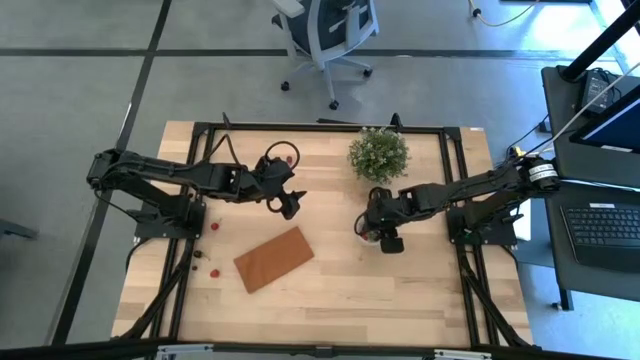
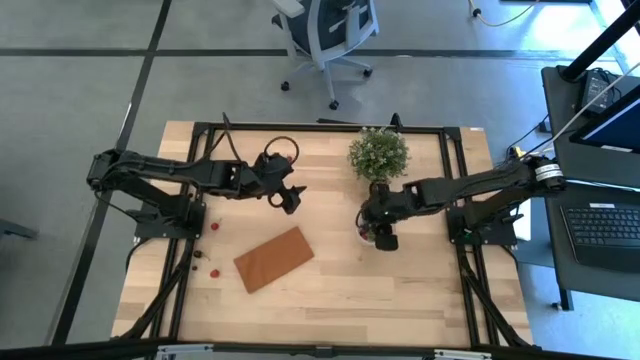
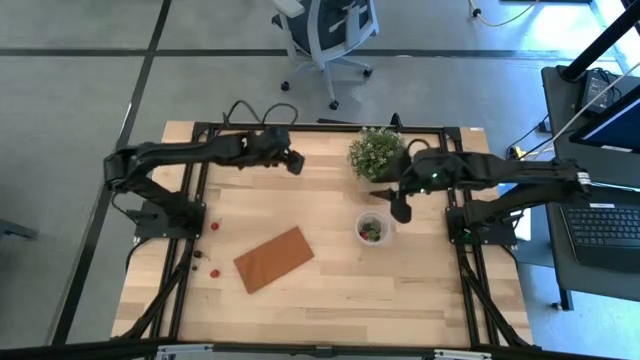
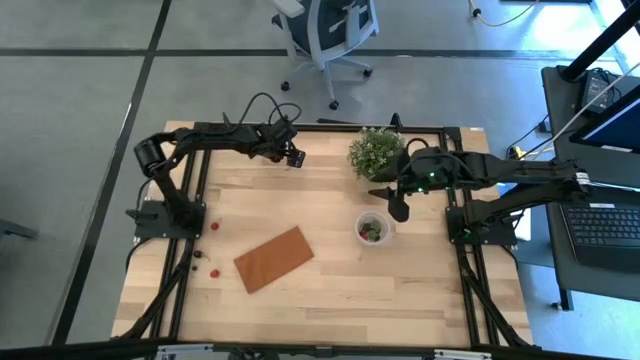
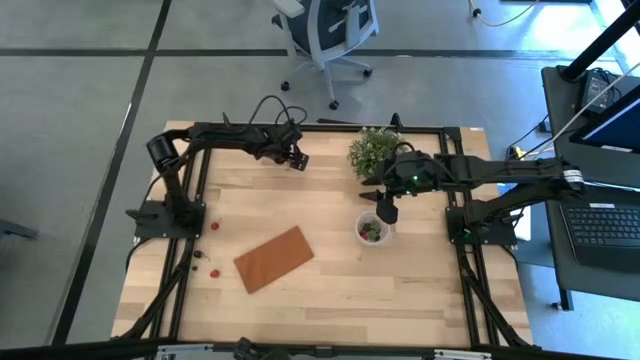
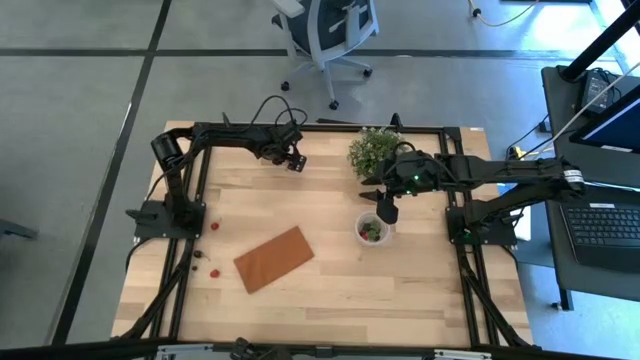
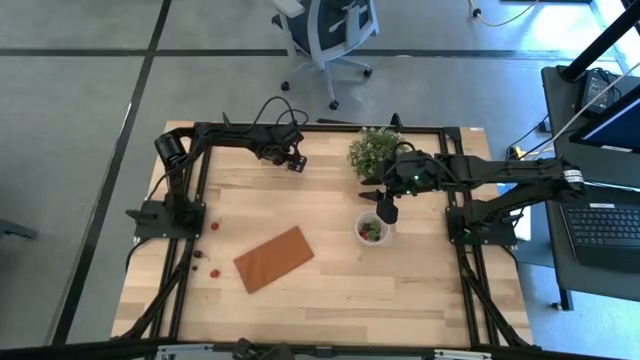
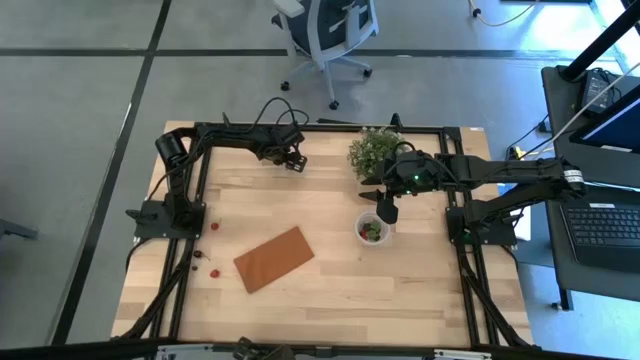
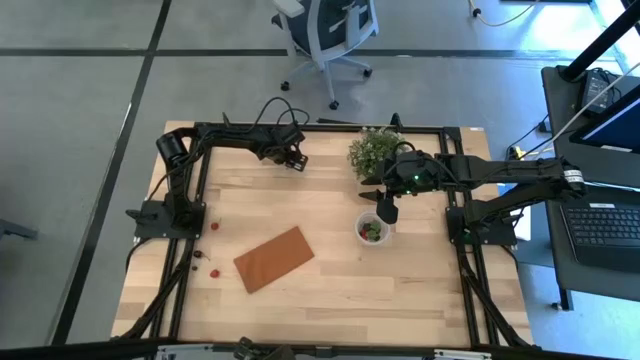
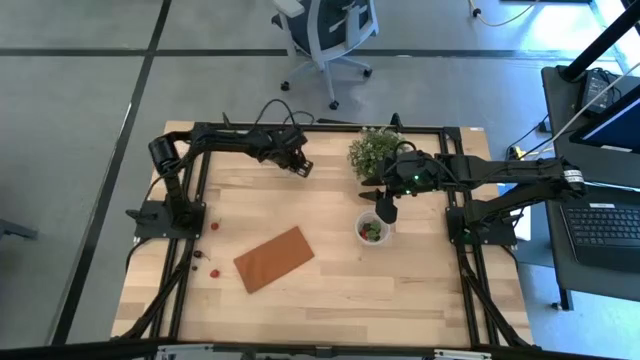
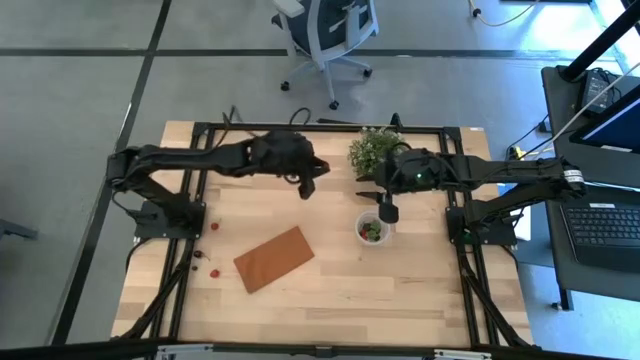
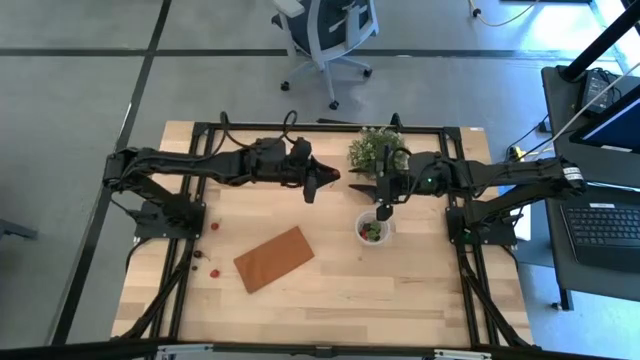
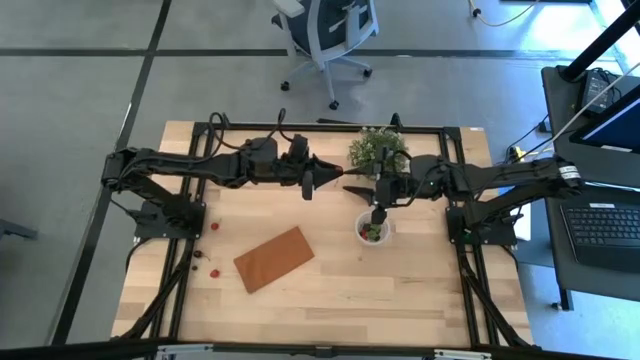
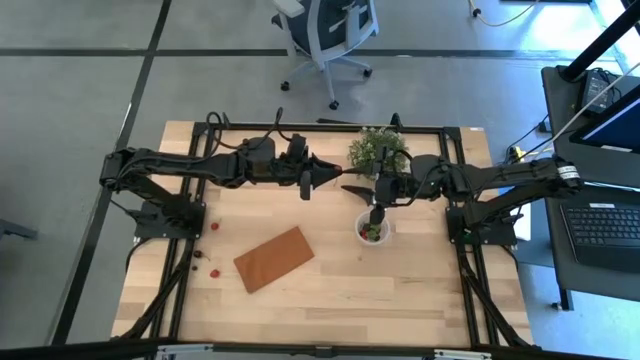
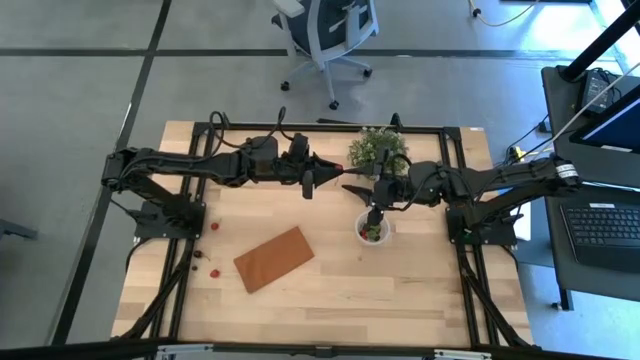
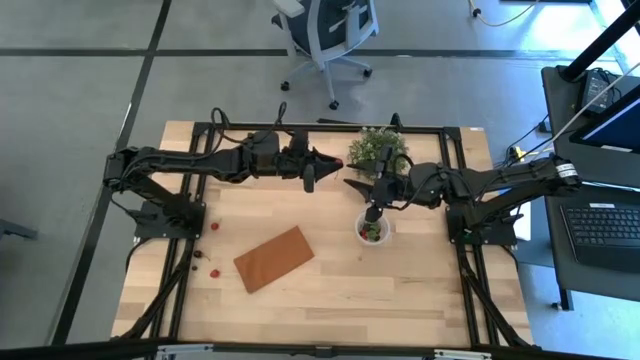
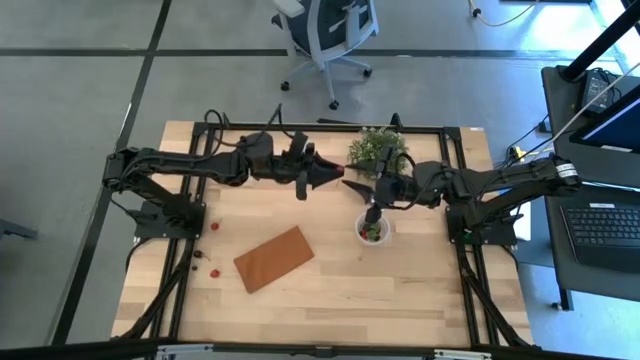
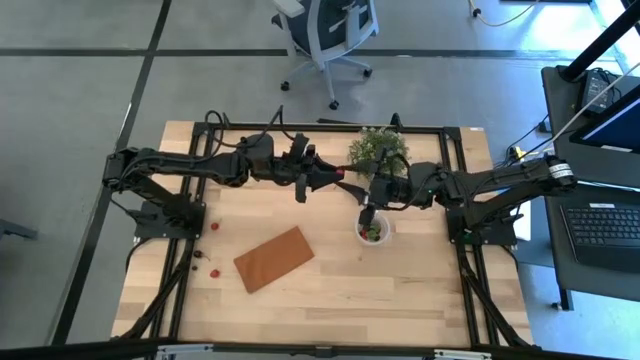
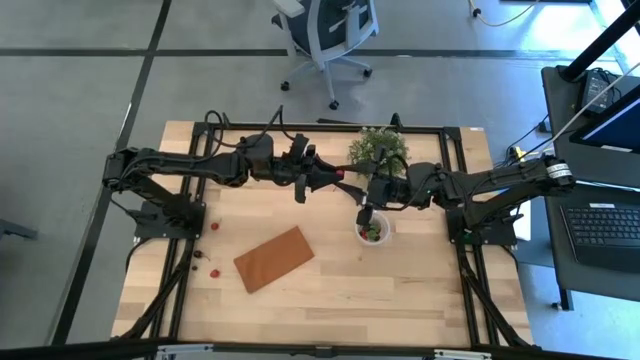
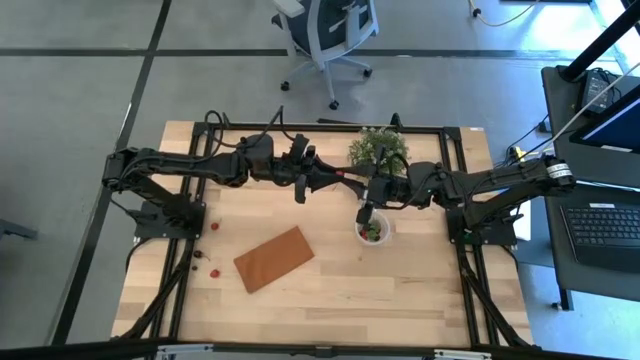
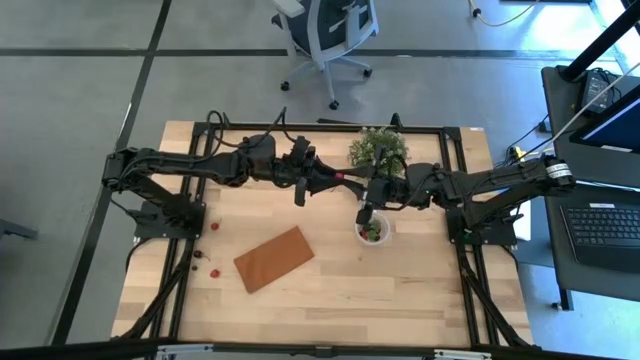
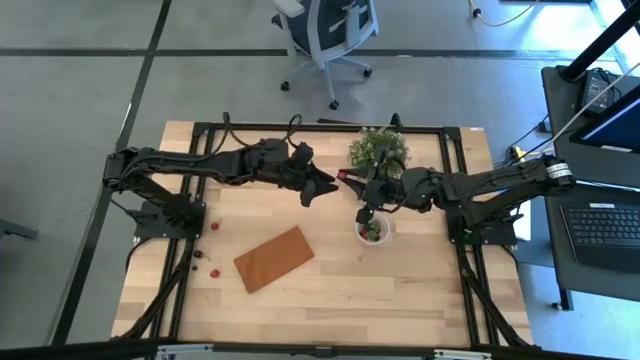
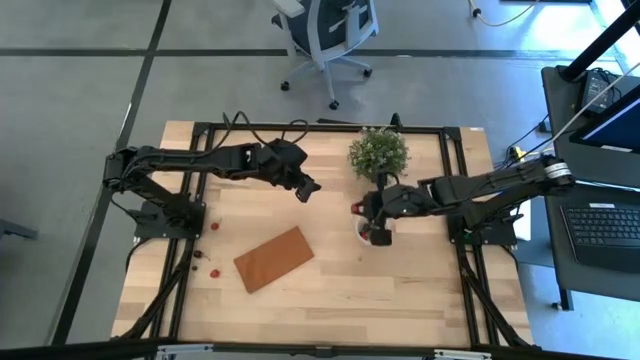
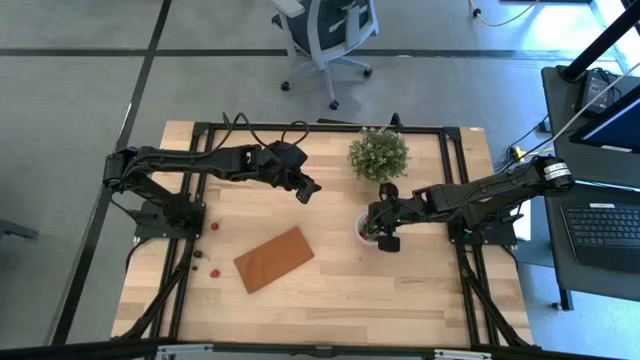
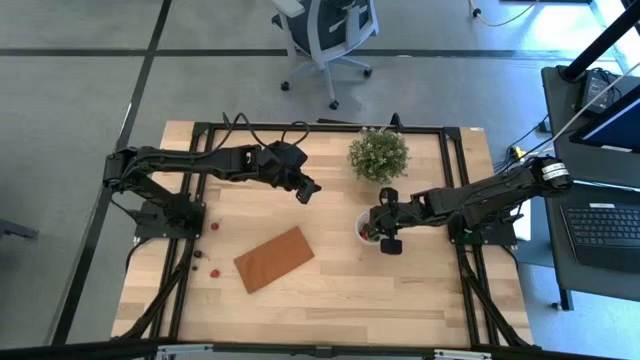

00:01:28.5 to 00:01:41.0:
Task: Pick and placing Produce into tupperware
Put the red cherry into the transparent bin

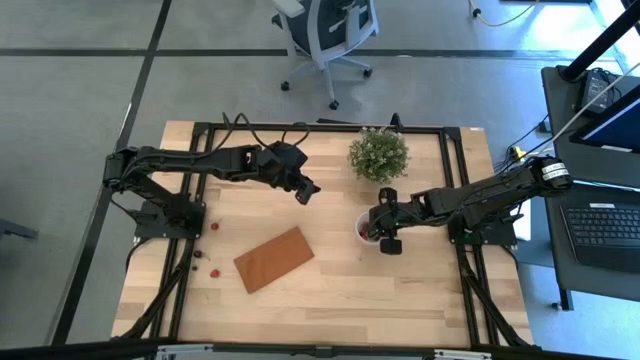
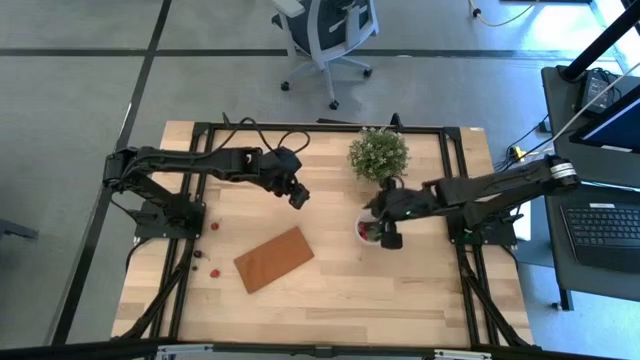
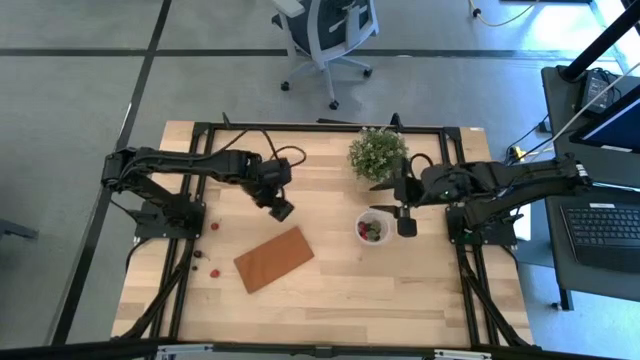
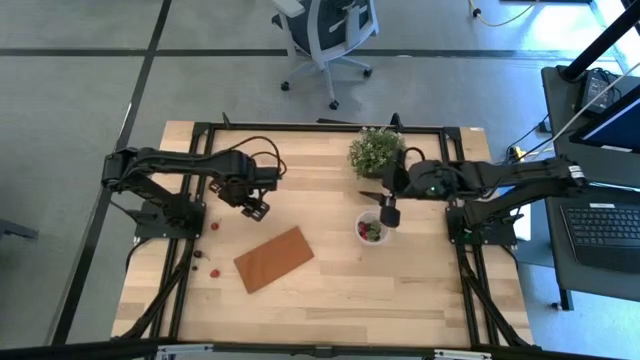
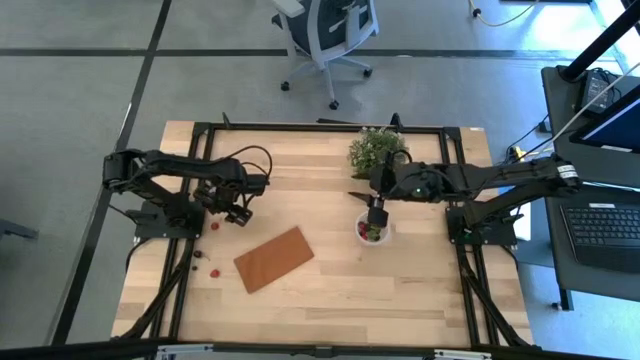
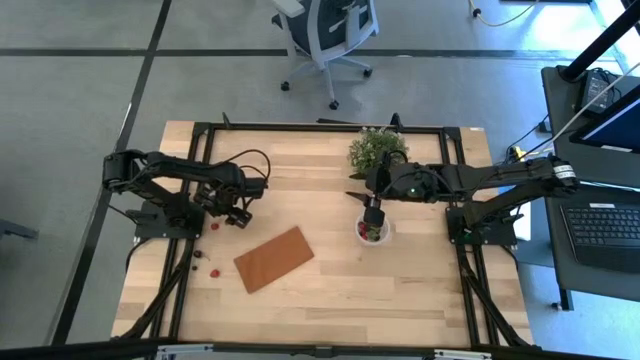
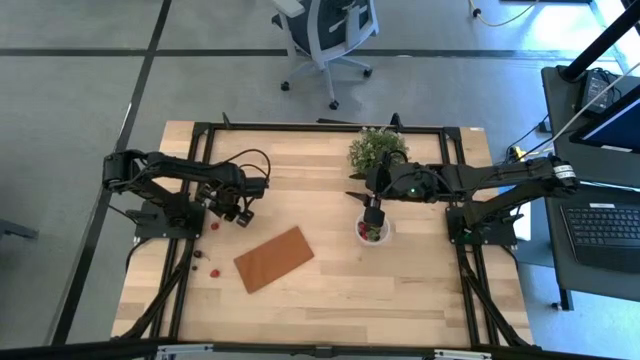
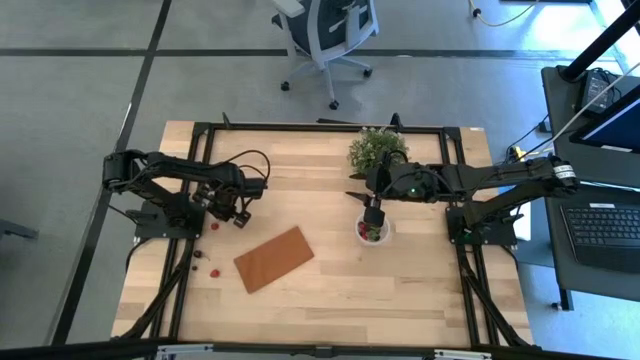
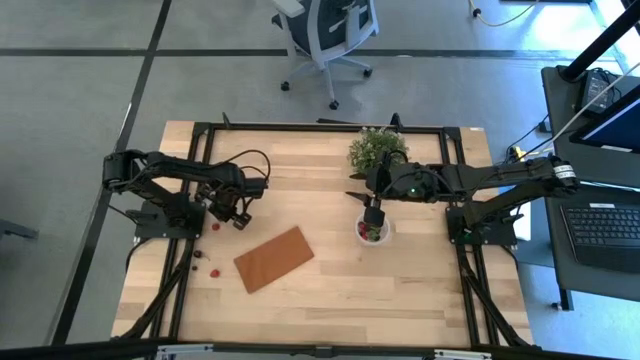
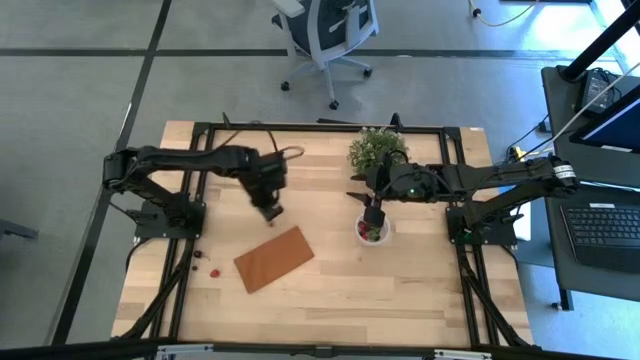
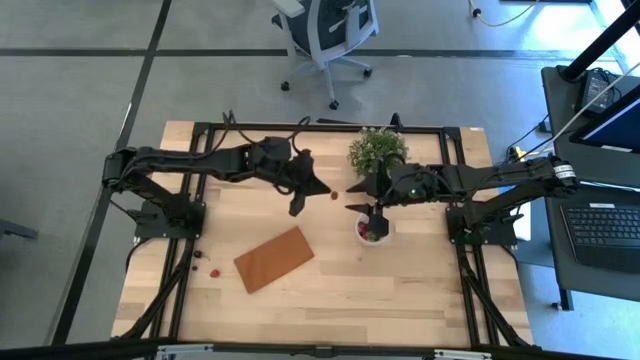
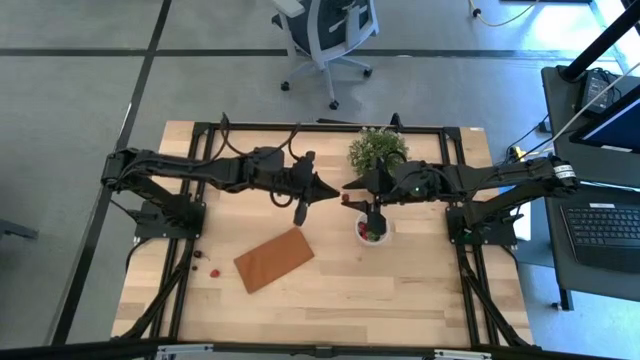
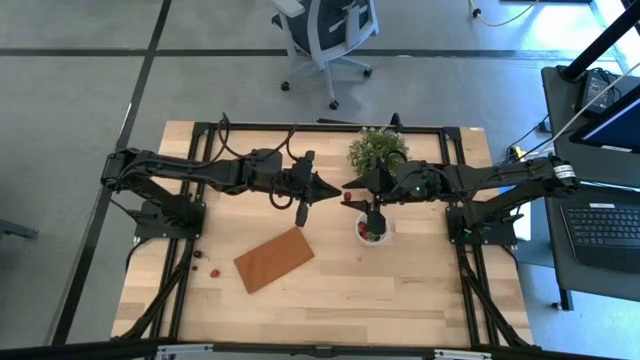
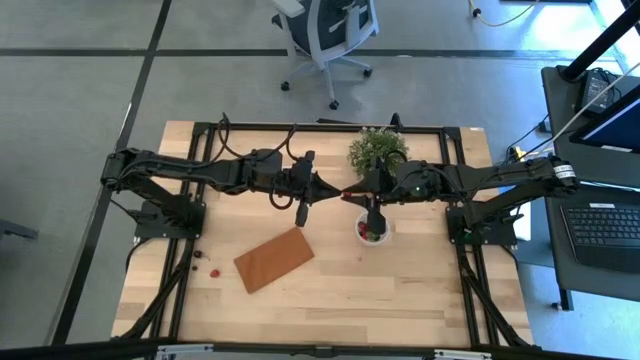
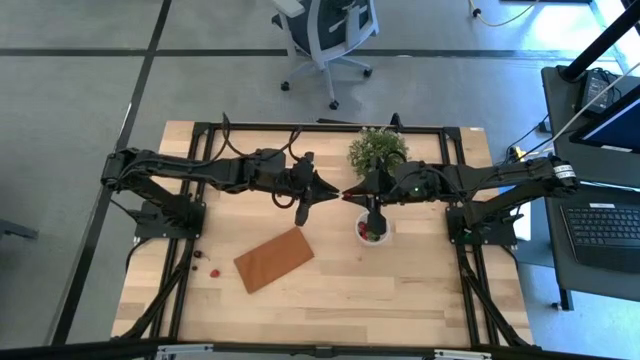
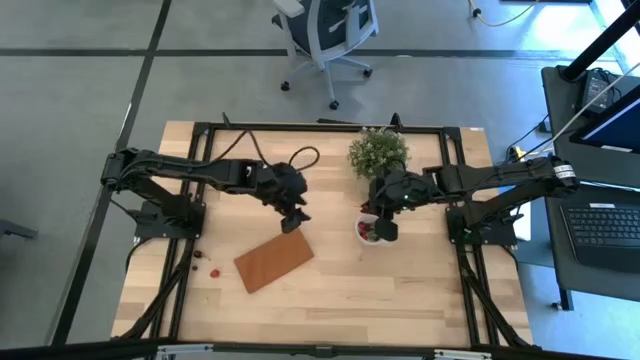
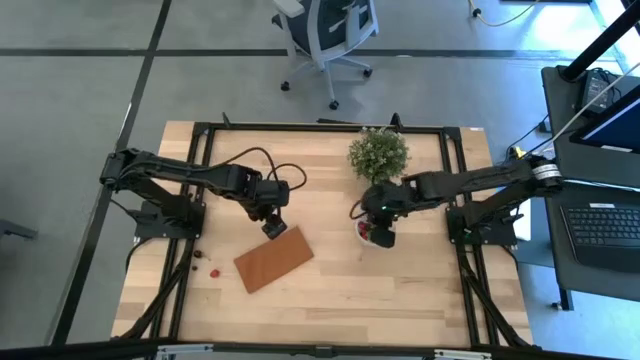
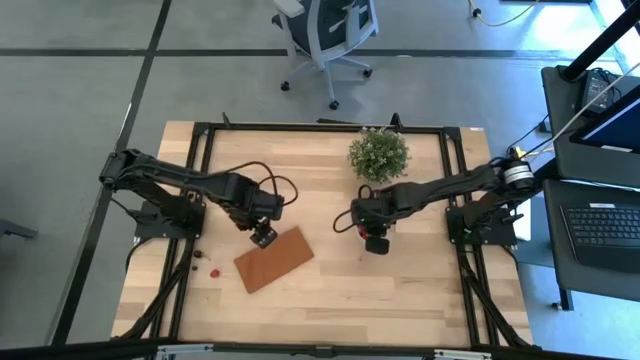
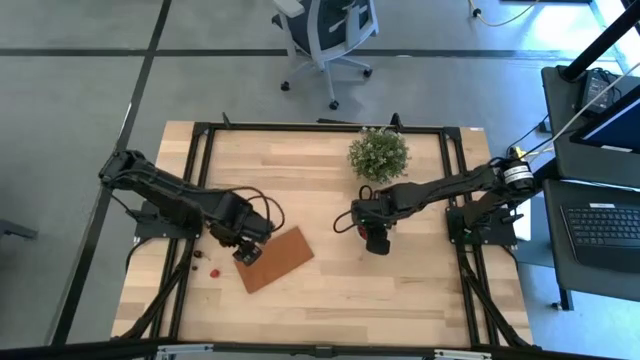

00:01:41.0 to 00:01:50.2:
Put the red cherry into the transparent container
